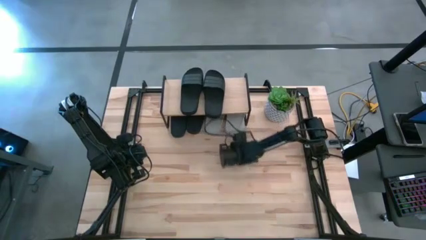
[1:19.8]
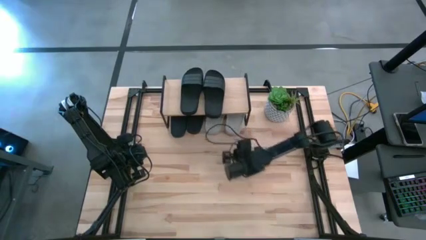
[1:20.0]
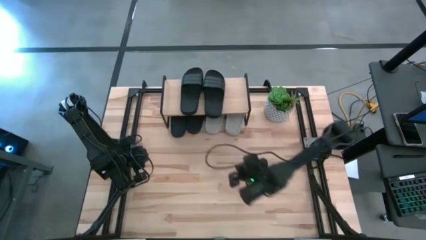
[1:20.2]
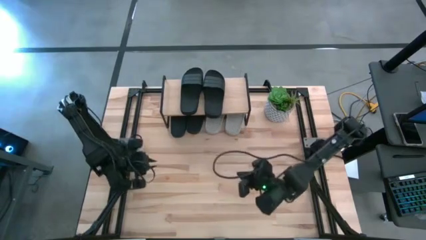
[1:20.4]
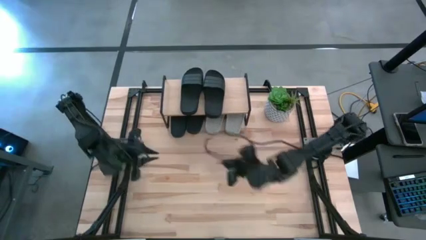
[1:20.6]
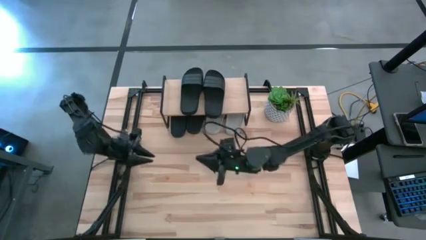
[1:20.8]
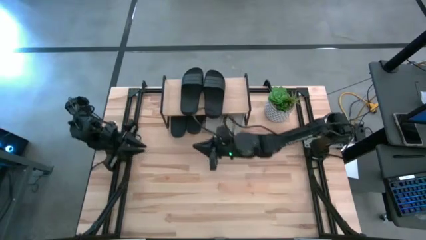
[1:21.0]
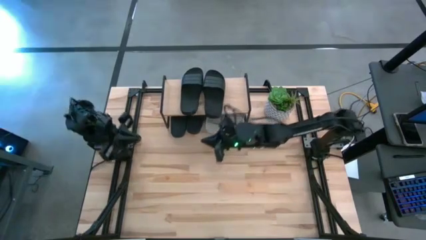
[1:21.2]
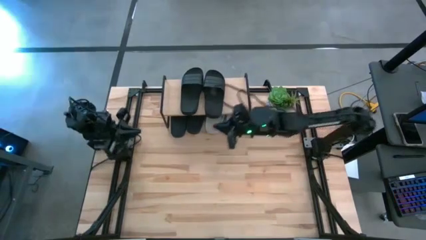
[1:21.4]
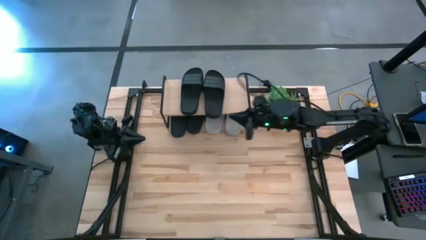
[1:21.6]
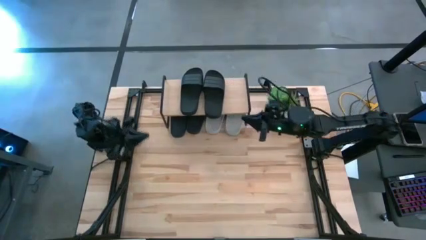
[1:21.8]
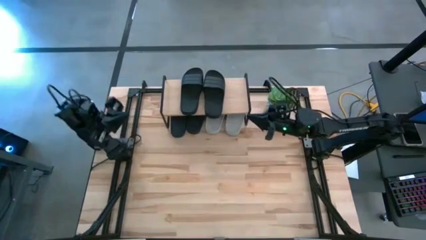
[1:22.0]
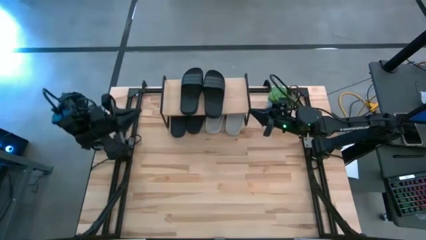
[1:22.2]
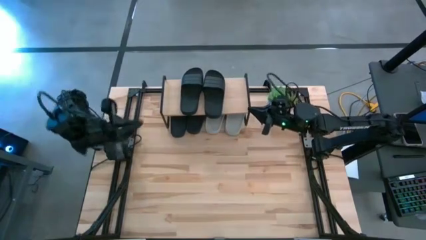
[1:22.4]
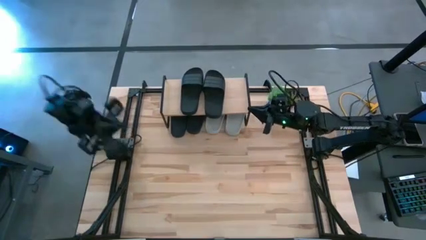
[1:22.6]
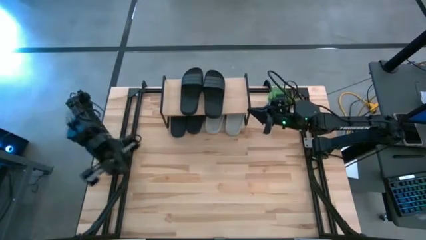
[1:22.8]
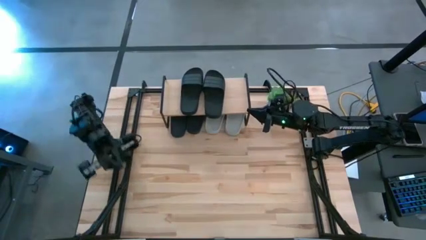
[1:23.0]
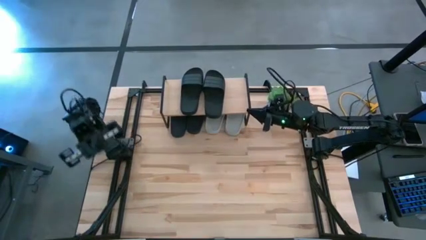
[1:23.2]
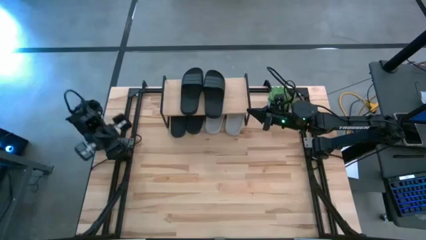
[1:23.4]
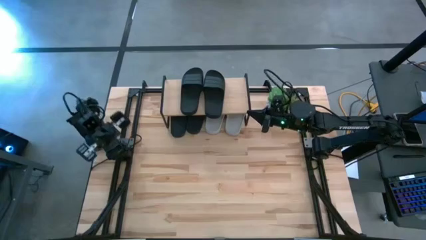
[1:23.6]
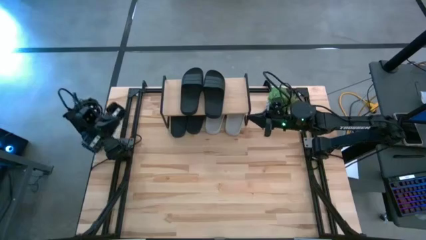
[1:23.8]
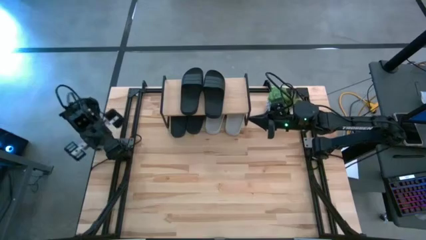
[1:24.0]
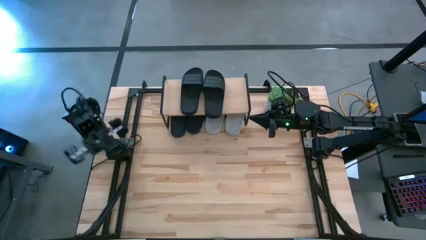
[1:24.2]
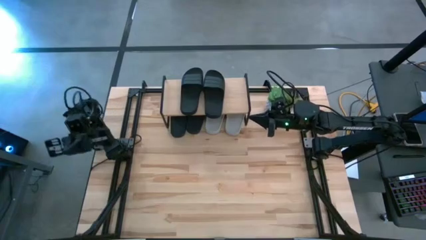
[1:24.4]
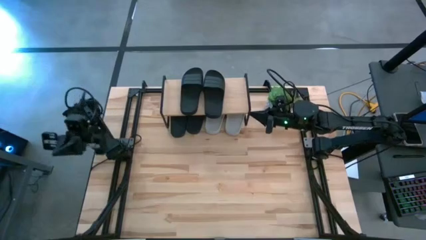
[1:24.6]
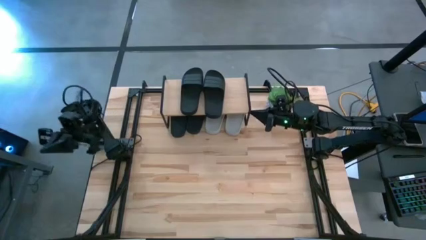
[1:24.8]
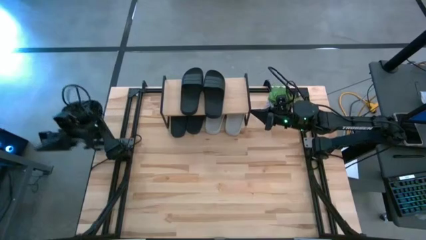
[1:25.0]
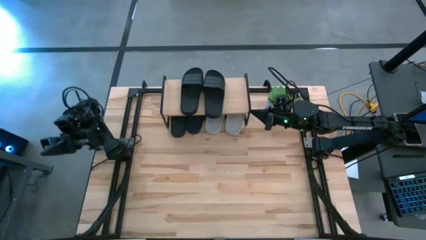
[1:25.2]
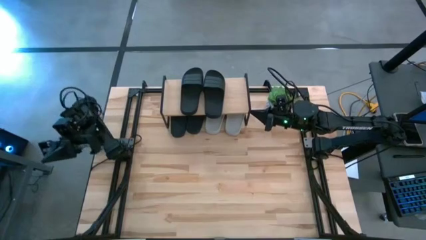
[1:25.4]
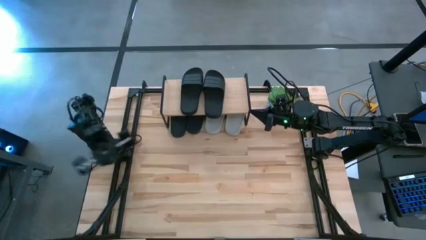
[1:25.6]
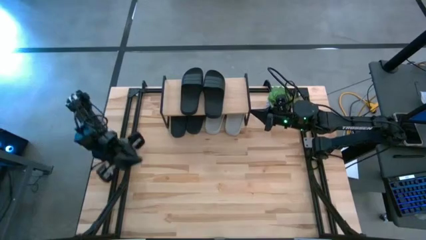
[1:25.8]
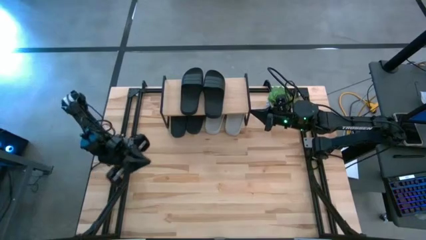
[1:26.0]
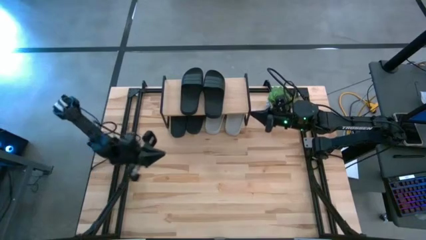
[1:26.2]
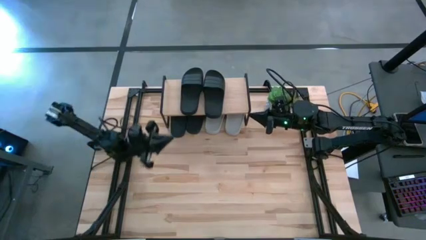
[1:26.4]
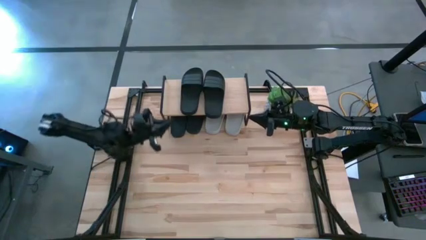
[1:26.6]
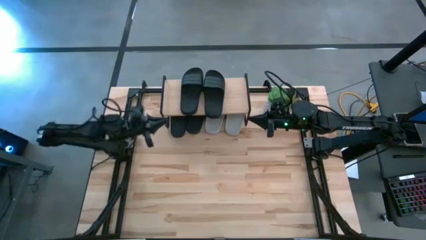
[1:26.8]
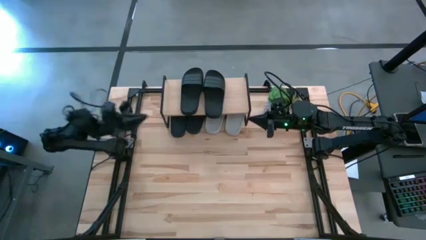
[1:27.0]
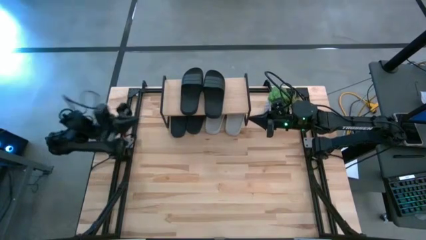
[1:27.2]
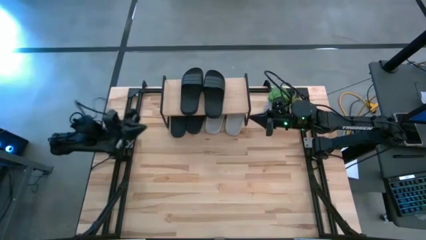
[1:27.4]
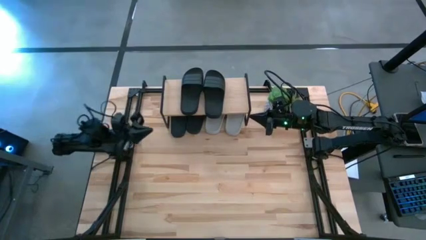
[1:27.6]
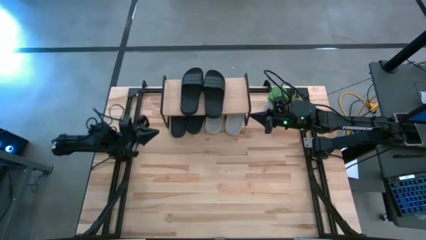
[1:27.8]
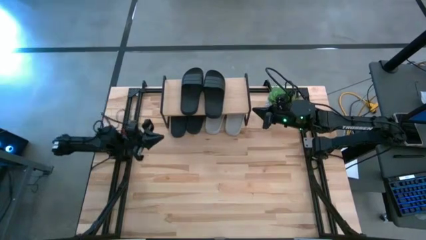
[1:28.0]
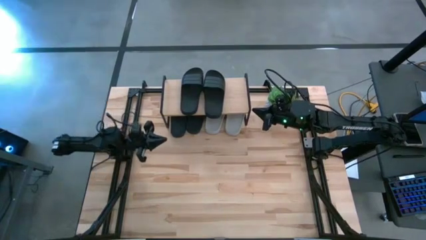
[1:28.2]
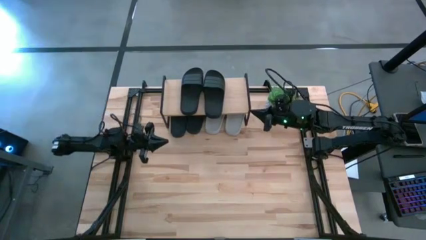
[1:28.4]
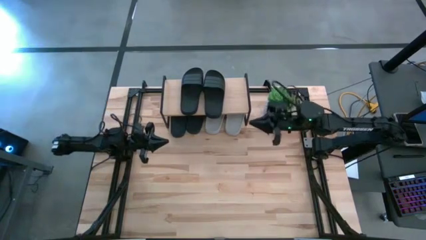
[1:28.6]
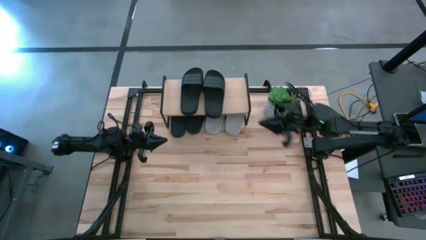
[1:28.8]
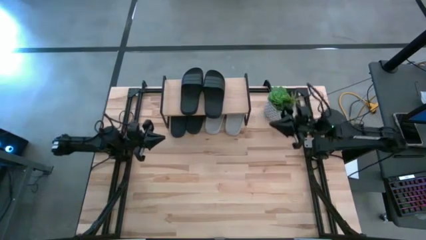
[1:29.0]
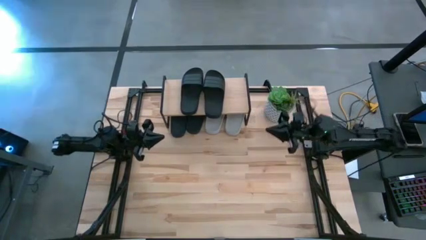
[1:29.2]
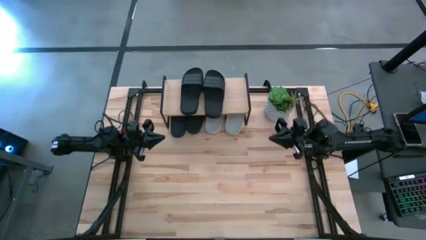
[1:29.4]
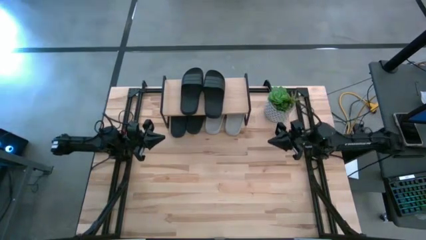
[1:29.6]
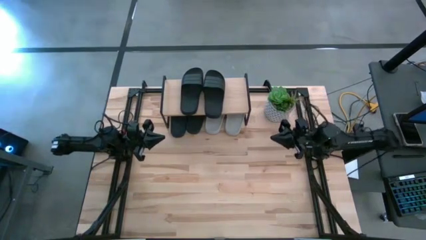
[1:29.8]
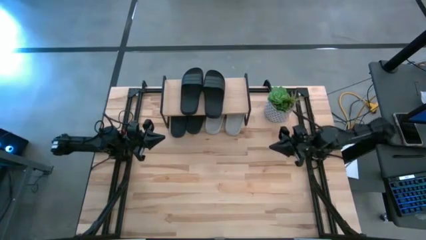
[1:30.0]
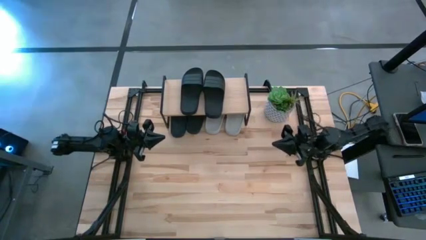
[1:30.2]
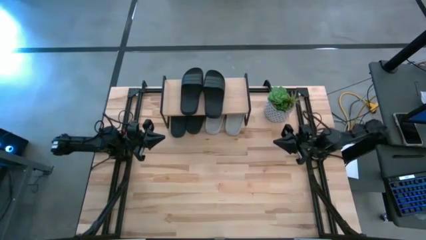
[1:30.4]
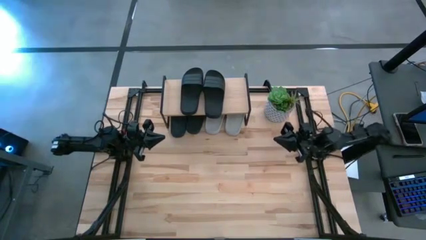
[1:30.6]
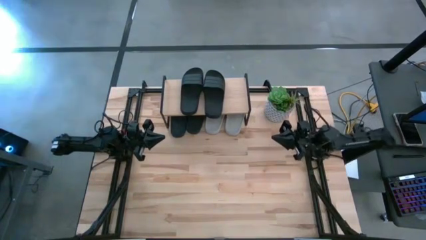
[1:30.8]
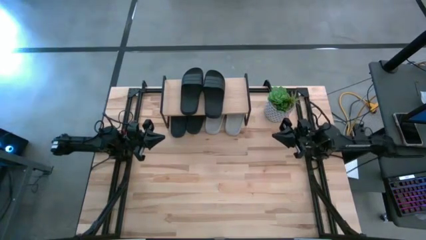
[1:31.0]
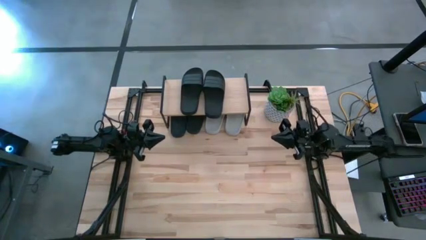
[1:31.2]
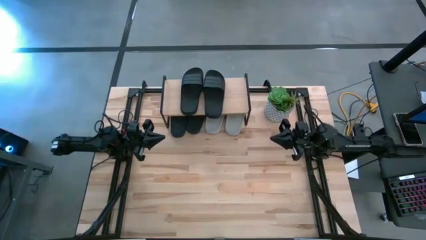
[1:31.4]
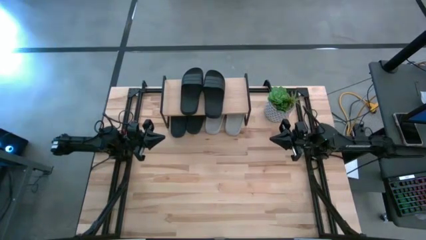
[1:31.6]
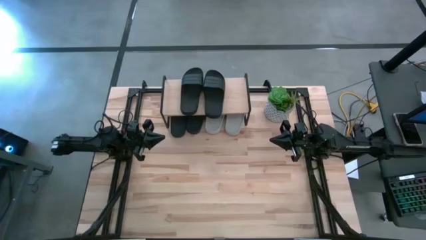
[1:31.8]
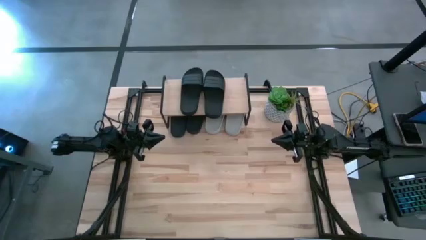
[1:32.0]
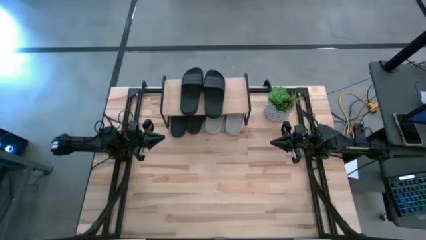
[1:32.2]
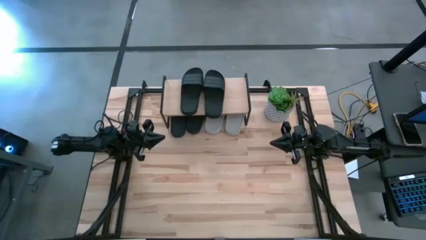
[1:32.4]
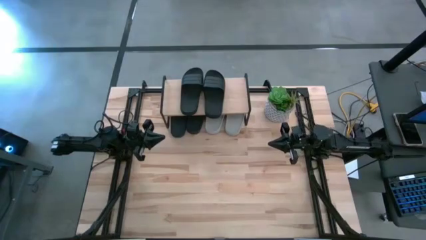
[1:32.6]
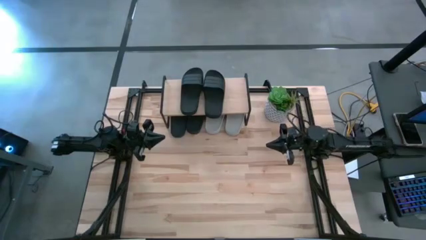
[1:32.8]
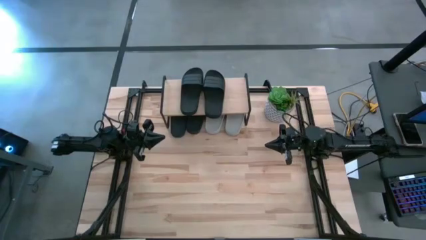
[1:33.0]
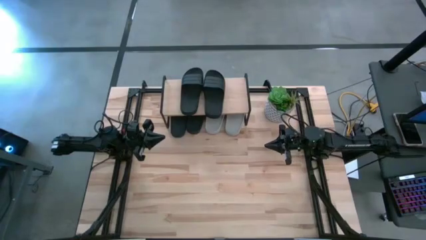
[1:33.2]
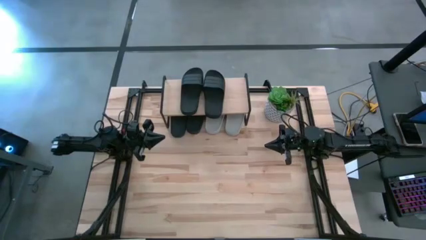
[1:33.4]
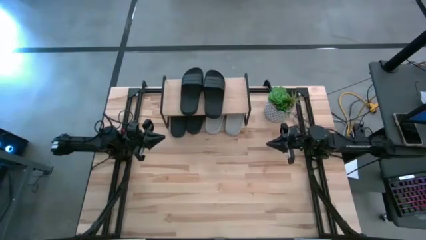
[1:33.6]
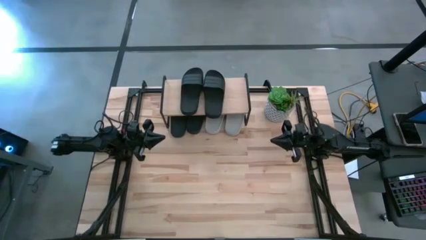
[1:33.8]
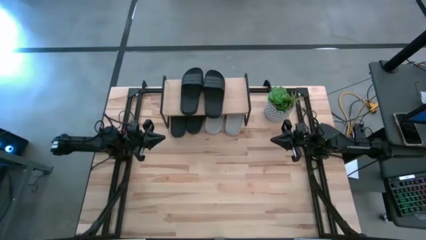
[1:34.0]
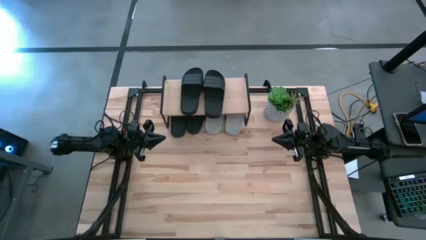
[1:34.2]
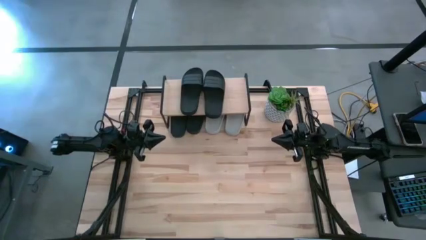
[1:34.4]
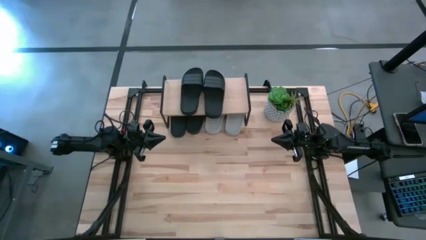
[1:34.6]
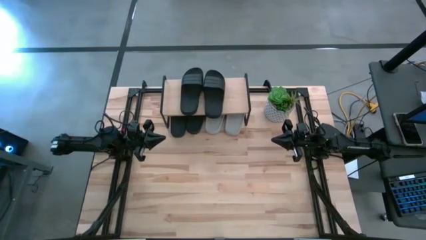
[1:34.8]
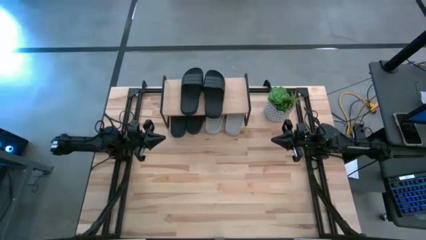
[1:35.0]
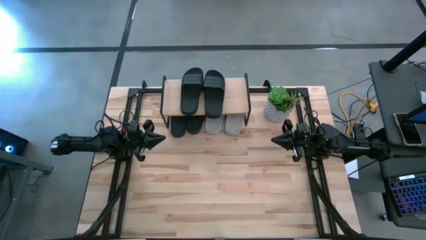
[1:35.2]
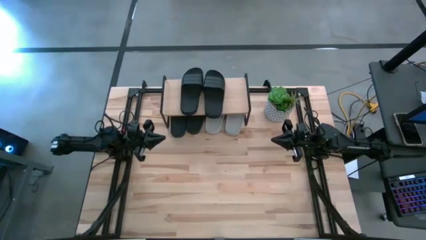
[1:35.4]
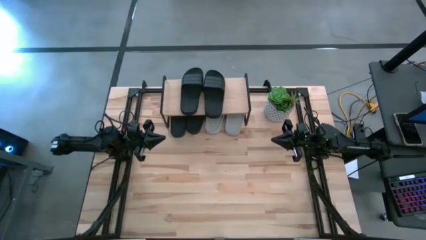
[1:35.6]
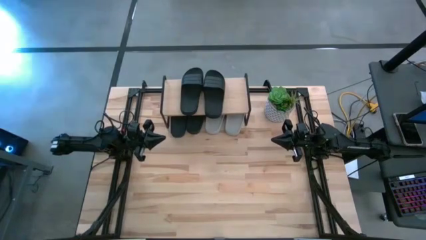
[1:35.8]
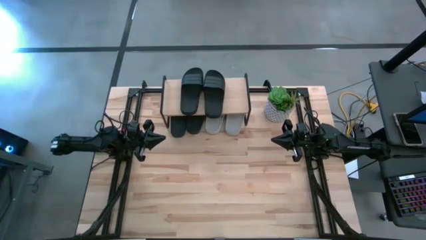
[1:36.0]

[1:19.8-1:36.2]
Task: Pick and place slides into the shelf
Return to Home Position
